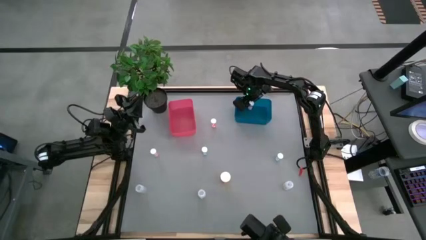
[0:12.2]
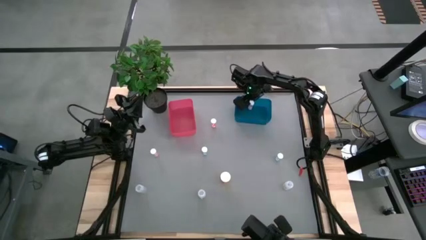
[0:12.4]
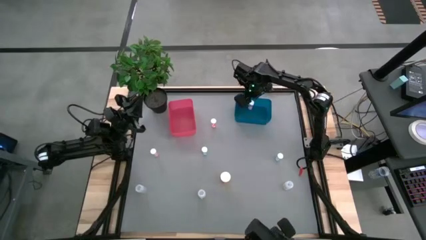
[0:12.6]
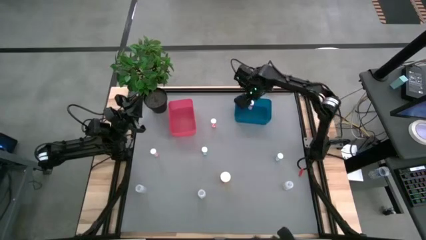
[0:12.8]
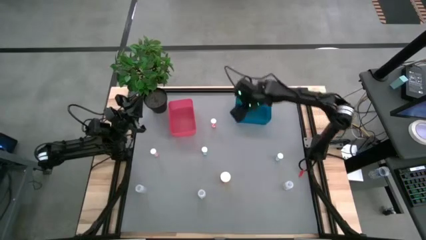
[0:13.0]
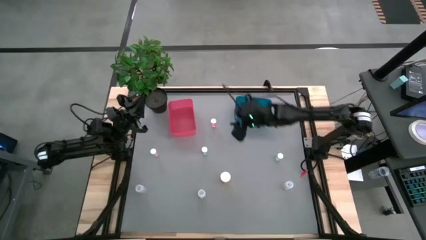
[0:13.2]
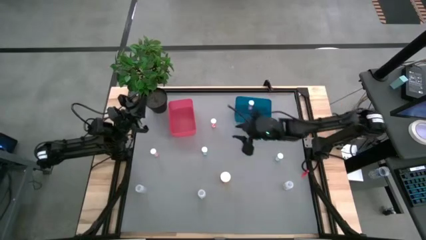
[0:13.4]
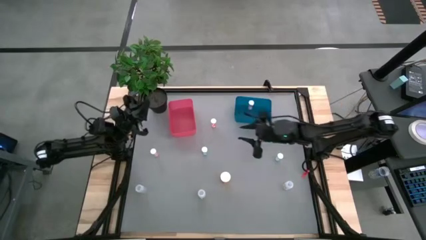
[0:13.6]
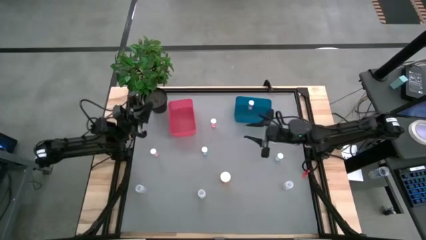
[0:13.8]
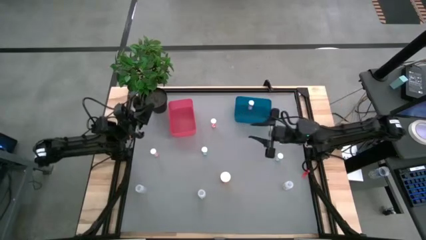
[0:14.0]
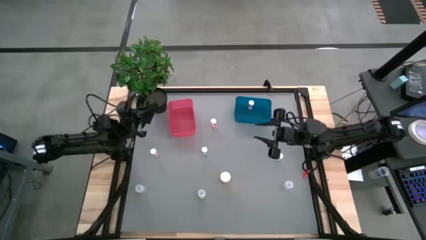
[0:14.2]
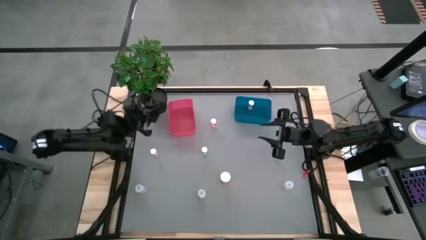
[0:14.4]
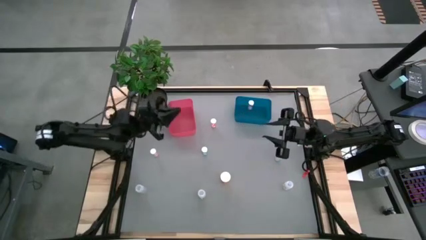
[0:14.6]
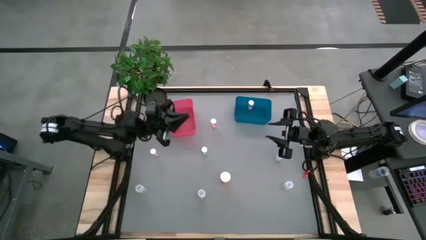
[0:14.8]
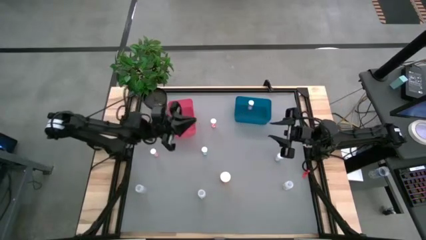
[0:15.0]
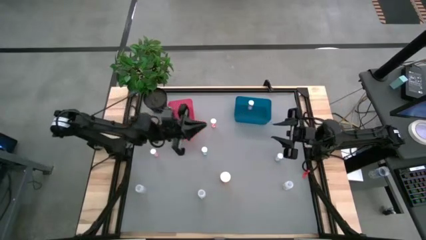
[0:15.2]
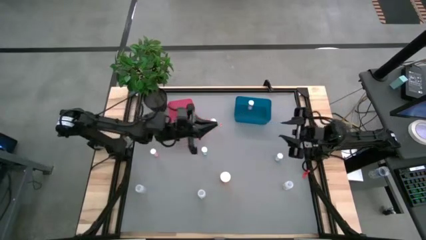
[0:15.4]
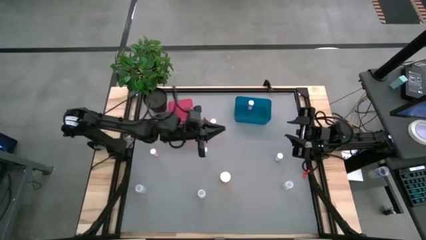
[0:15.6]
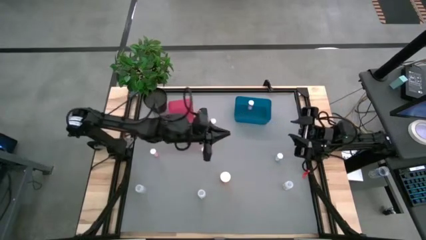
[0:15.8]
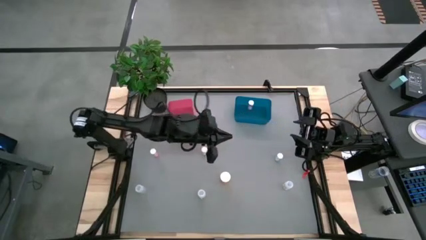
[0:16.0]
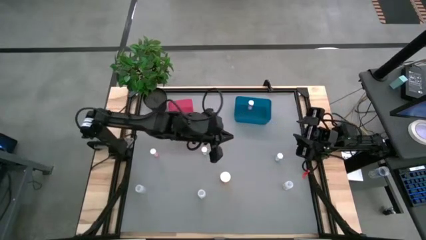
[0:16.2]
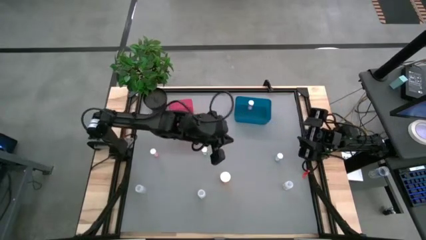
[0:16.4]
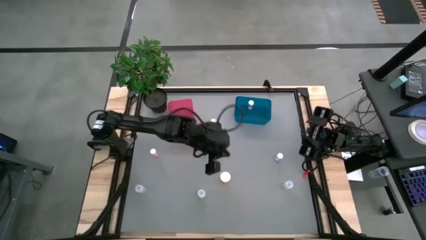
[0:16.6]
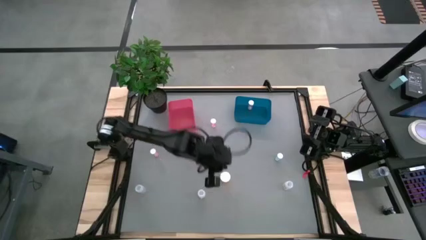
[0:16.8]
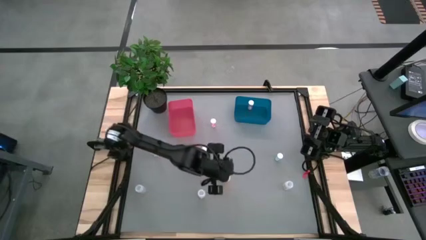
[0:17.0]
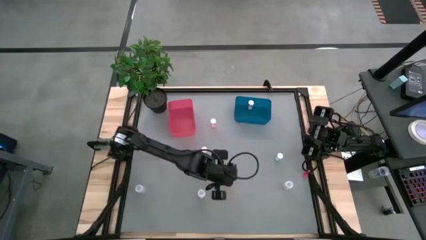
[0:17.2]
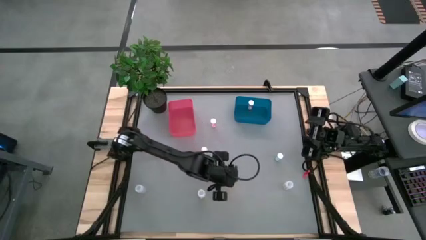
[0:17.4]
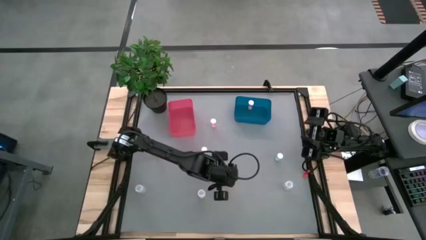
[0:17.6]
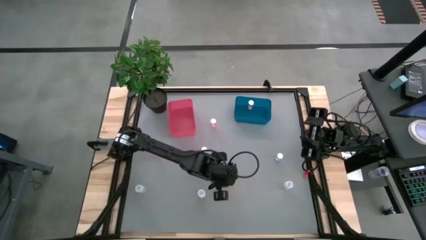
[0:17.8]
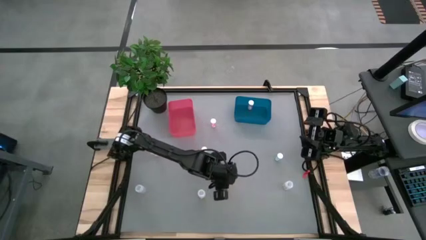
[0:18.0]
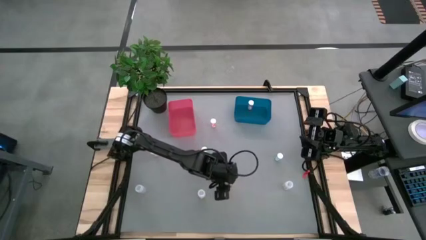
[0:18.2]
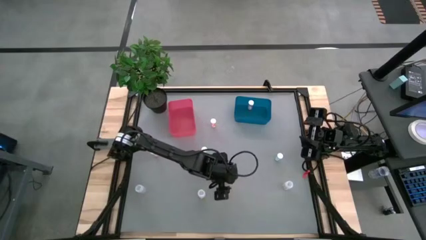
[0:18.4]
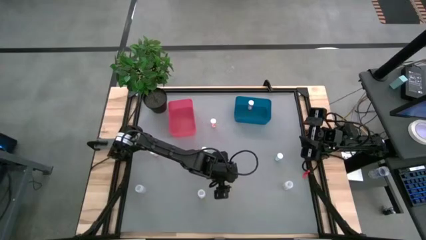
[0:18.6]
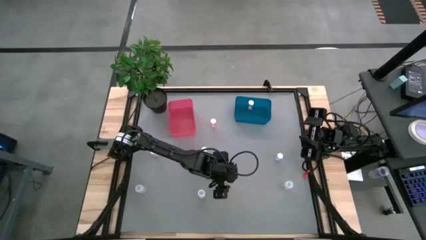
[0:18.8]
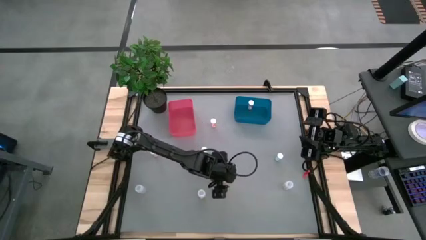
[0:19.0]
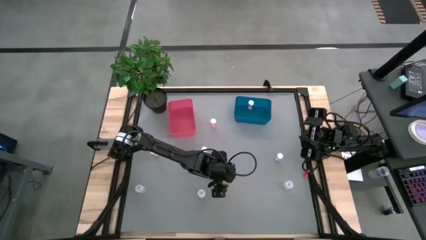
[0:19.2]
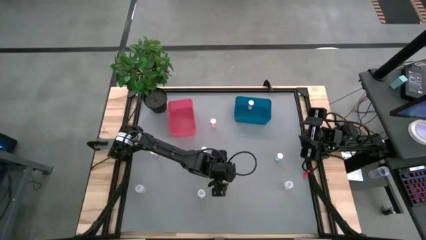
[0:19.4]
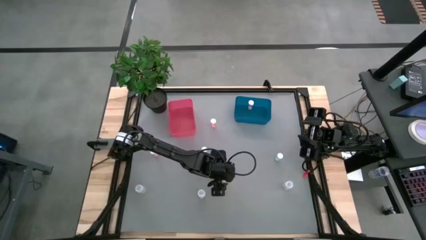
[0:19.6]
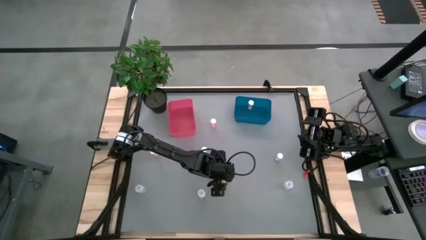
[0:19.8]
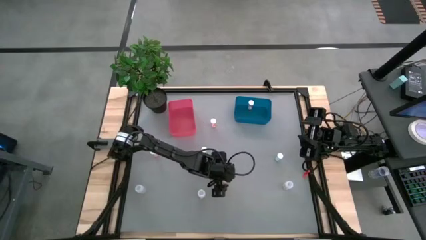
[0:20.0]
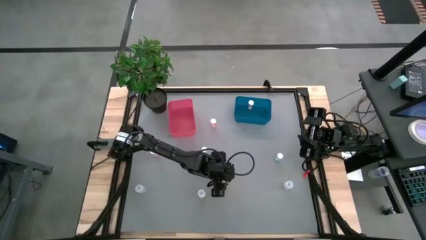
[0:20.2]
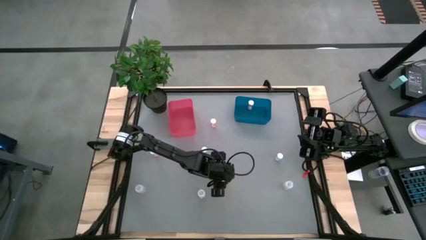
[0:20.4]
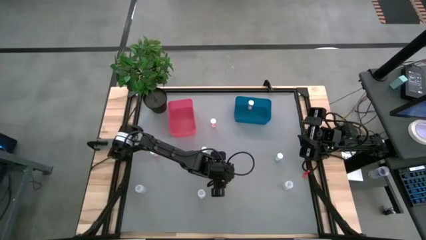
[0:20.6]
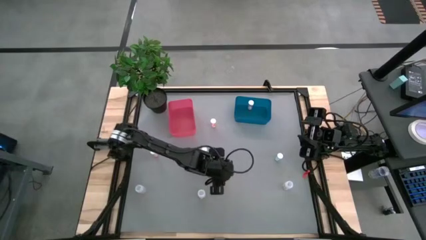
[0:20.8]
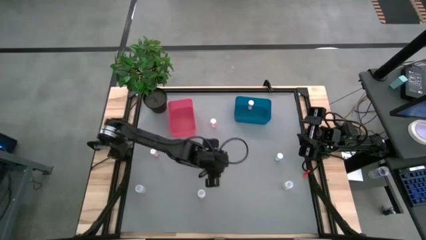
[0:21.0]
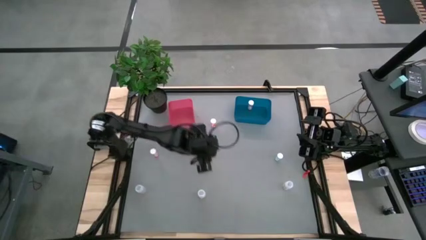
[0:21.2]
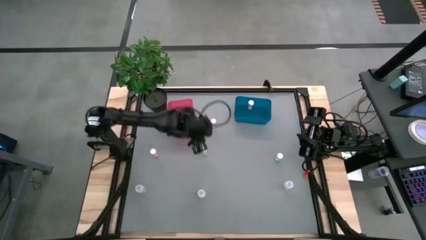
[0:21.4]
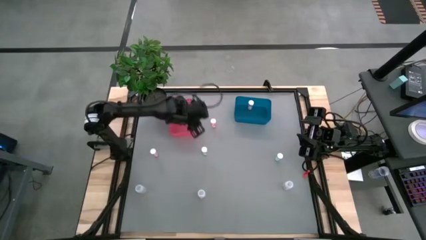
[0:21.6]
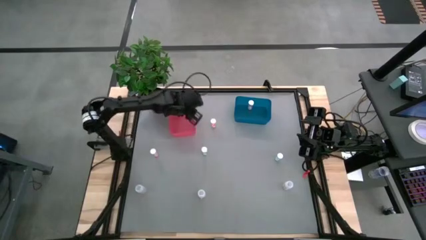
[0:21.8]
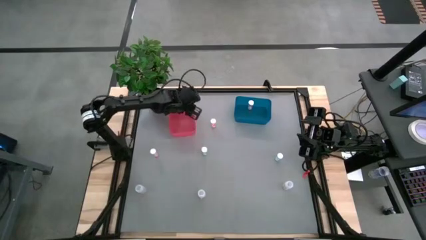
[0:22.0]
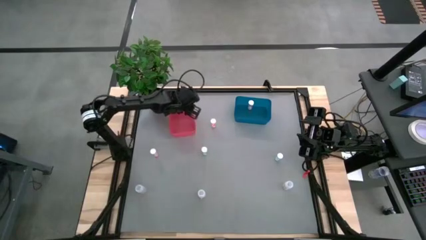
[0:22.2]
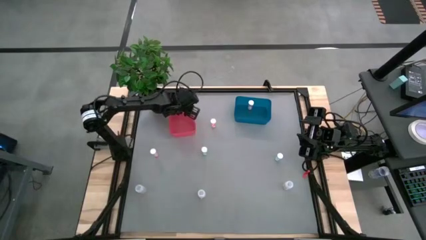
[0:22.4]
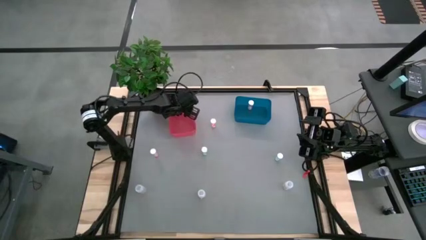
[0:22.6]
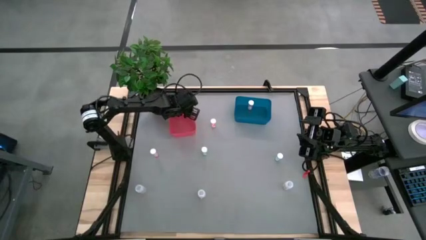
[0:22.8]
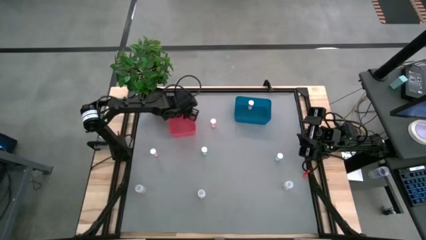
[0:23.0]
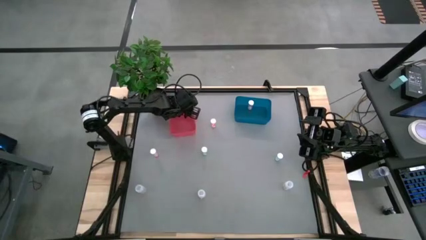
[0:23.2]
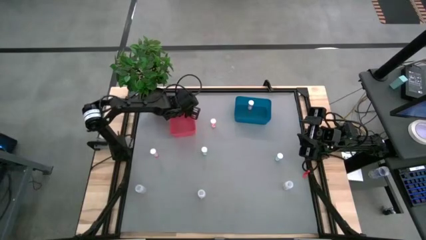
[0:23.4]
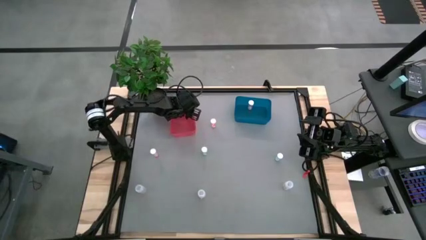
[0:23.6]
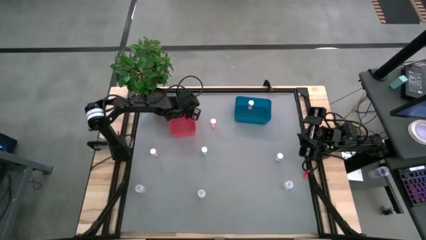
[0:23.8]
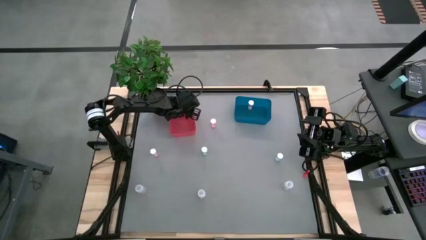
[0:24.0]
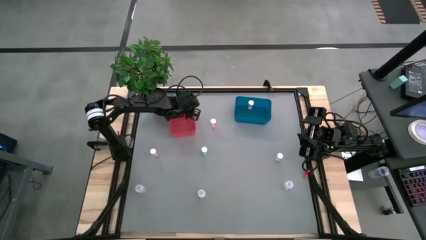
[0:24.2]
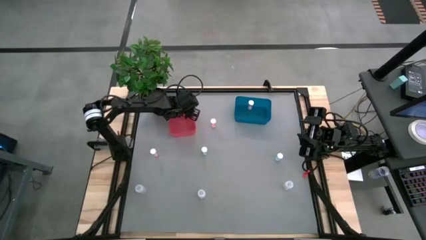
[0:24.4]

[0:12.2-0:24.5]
Task: Pick and place medicine bottles into bin by pill shape (circle, oval)
Put the orange capsule bottle into the red bin

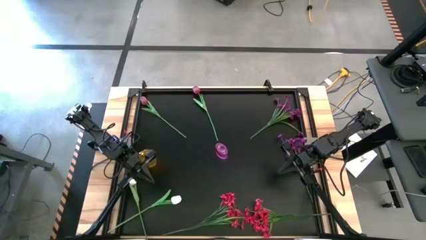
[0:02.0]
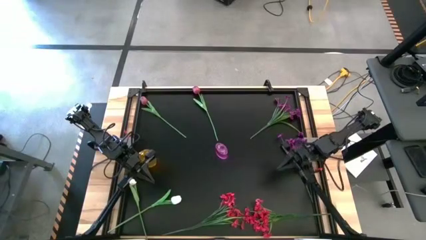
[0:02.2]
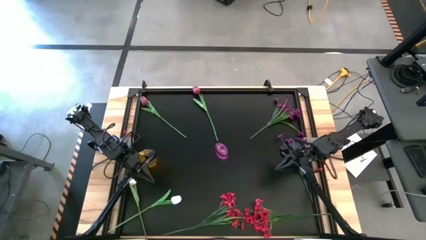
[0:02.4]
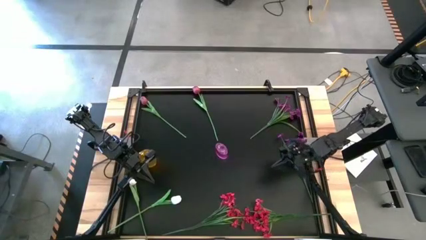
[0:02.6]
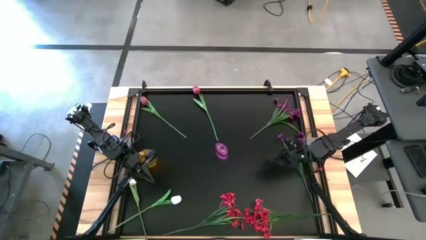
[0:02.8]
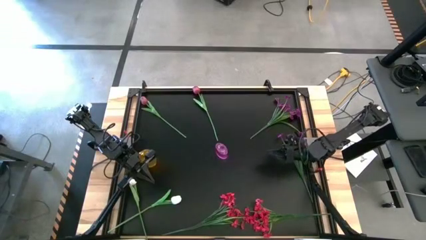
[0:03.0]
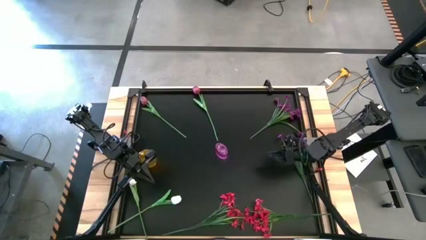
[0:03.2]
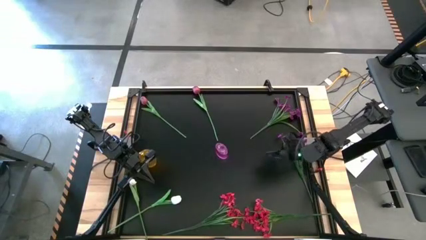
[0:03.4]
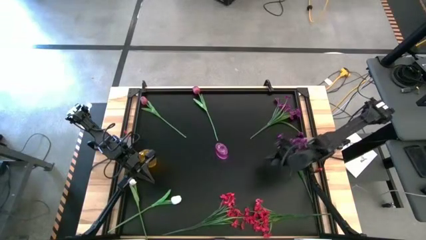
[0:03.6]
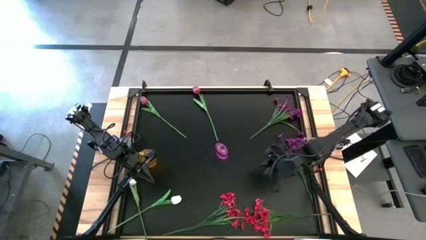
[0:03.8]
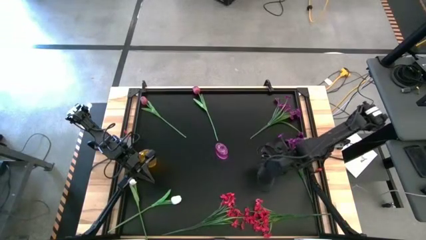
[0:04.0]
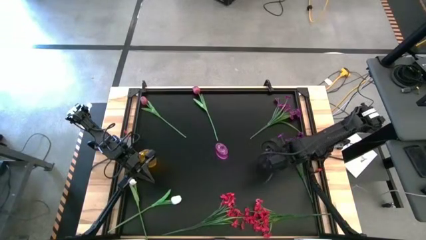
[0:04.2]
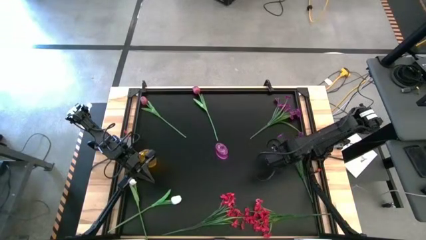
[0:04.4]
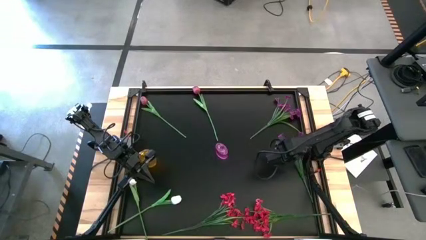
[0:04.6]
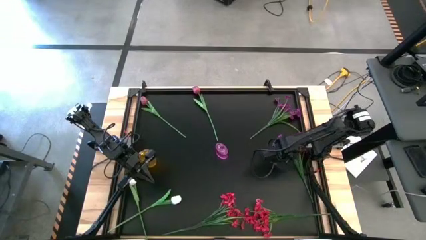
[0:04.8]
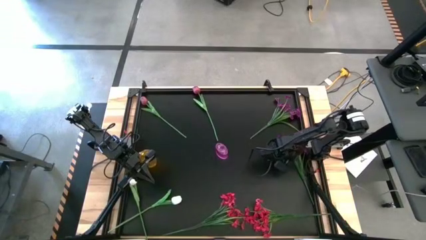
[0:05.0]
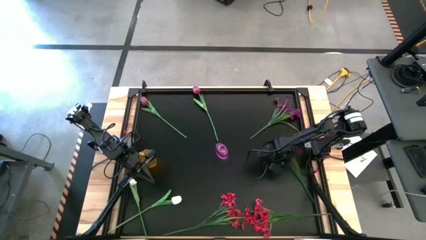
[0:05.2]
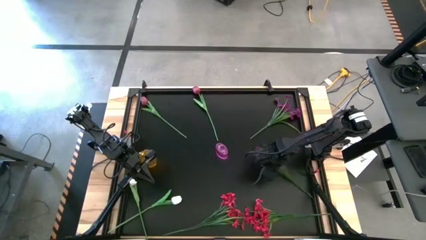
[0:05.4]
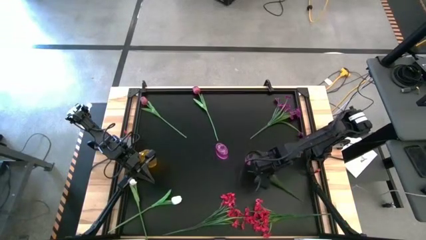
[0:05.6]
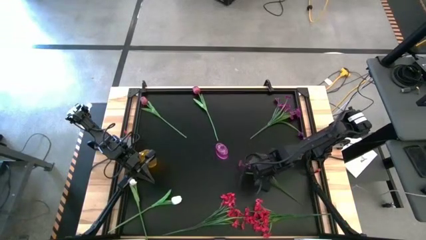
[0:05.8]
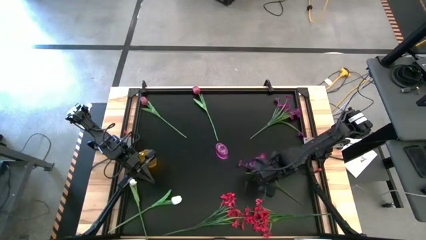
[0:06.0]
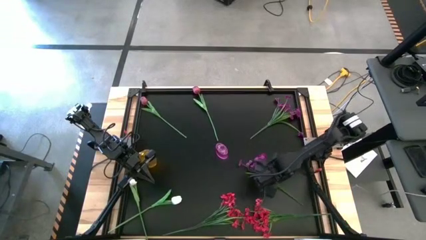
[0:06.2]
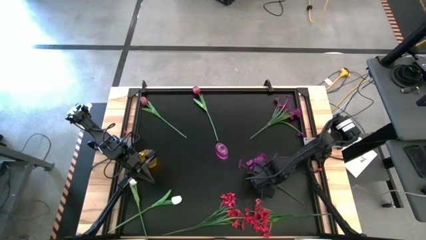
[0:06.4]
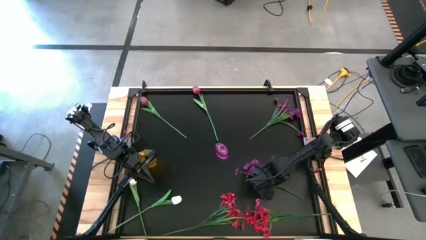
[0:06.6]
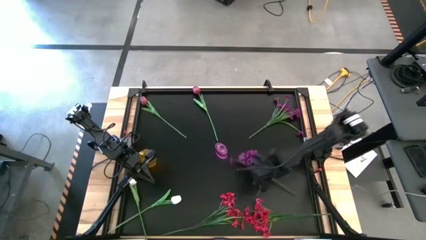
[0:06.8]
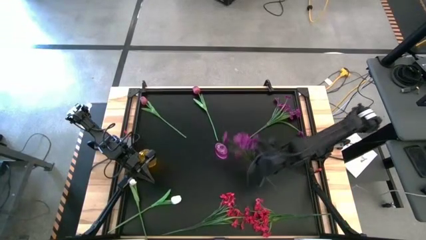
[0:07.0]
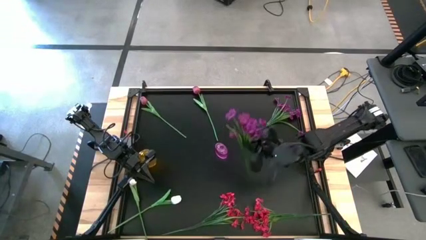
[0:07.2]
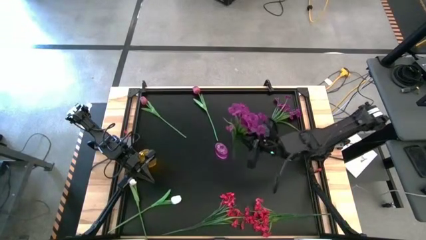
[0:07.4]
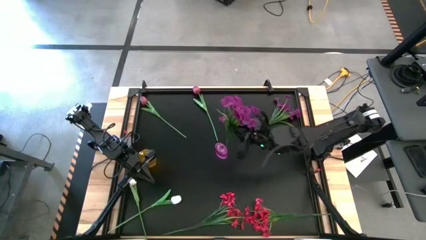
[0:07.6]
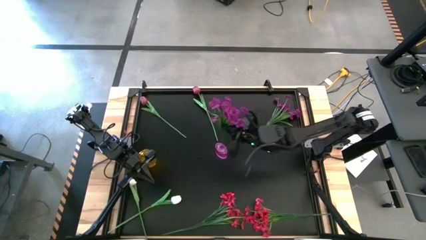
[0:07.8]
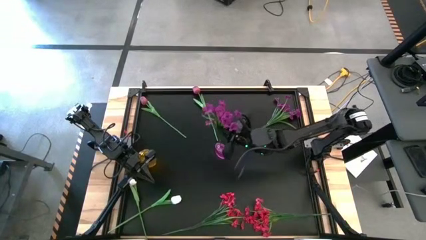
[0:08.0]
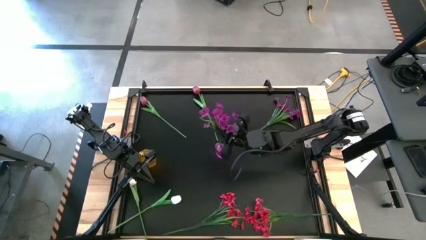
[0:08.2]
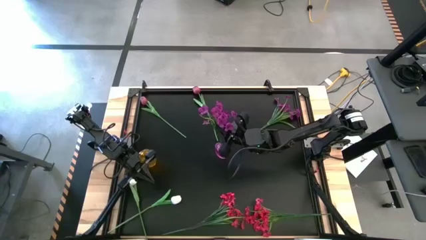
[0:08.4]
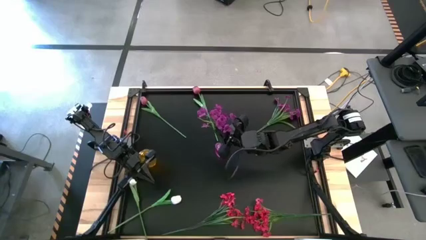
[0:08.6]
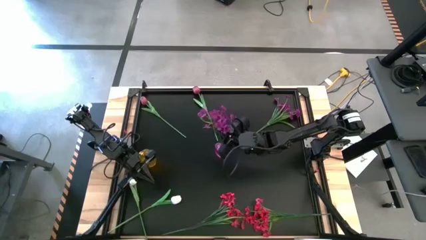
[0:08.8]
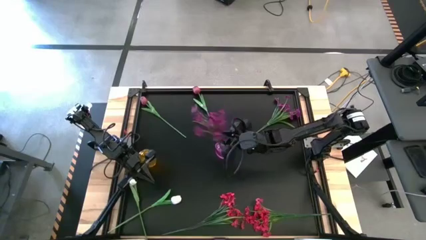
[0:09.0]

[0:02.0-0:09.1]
Task: Sort flowers into vase by color
Put the bottom right violet flowers into the violet flower vase
